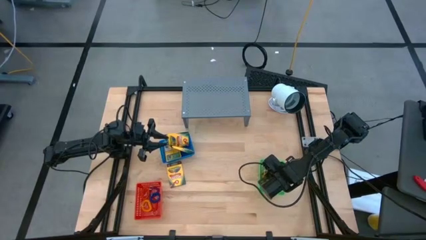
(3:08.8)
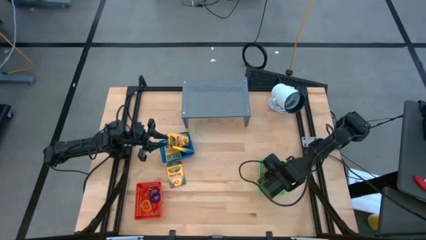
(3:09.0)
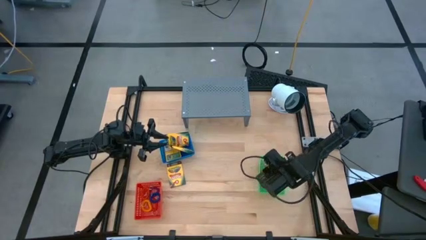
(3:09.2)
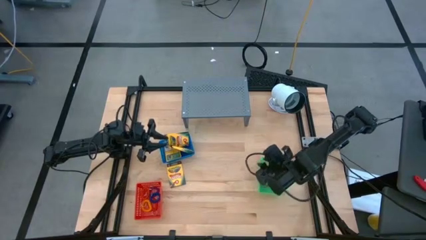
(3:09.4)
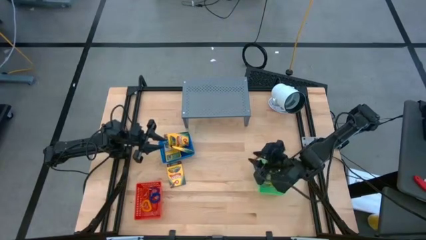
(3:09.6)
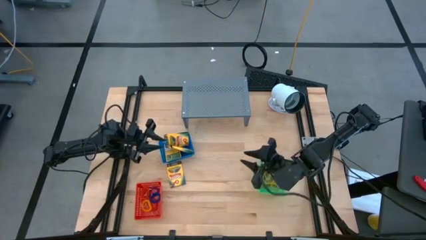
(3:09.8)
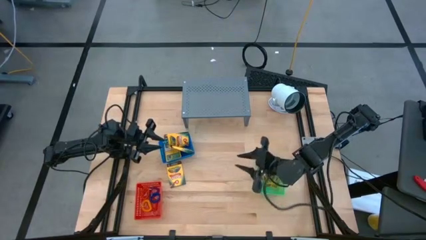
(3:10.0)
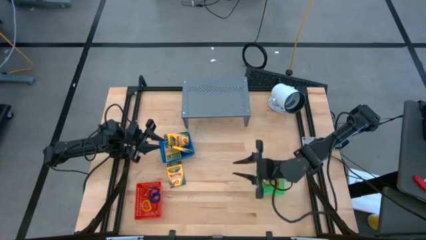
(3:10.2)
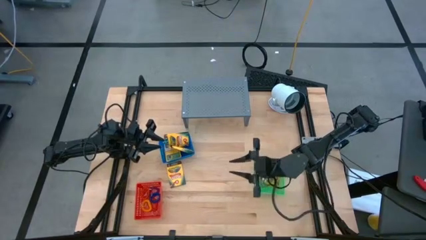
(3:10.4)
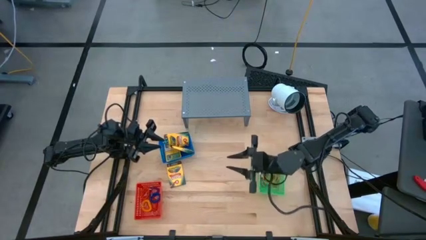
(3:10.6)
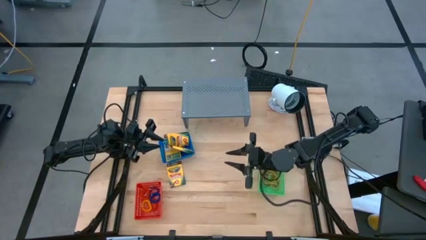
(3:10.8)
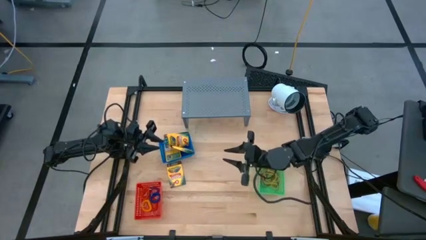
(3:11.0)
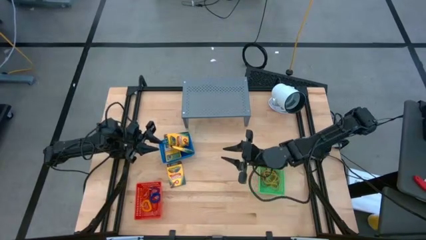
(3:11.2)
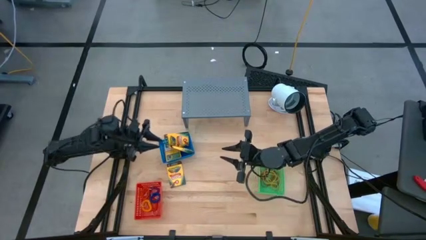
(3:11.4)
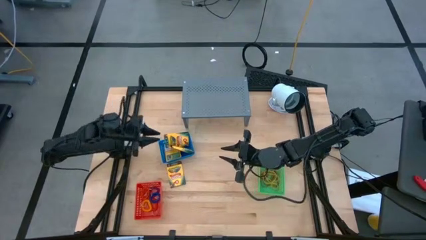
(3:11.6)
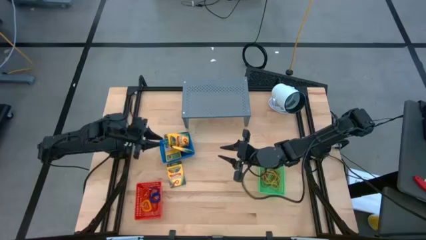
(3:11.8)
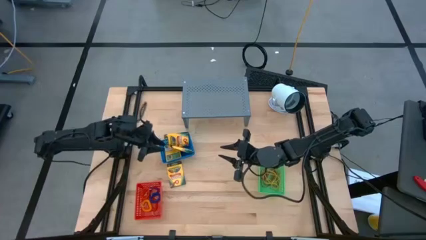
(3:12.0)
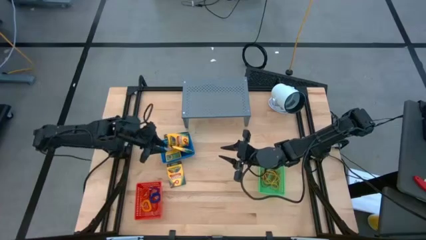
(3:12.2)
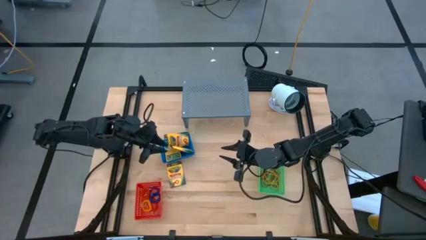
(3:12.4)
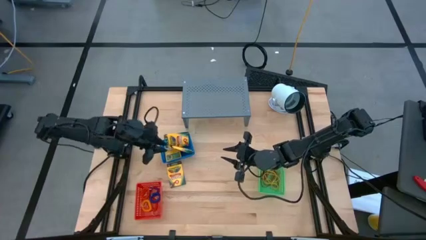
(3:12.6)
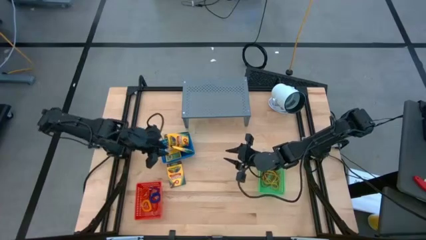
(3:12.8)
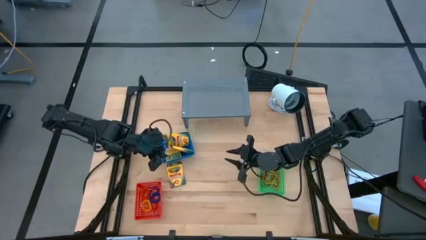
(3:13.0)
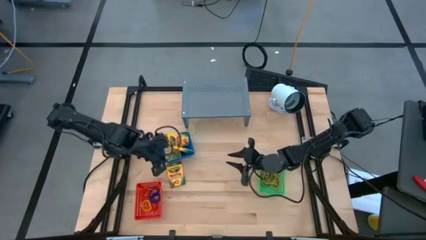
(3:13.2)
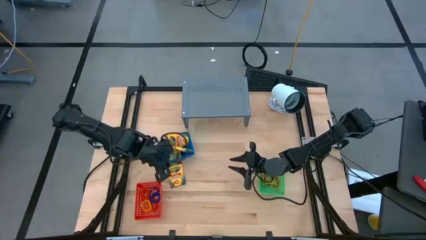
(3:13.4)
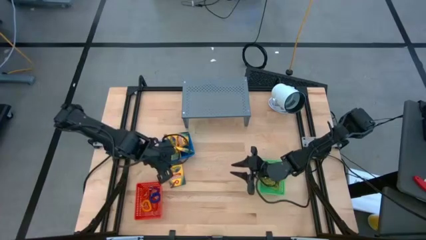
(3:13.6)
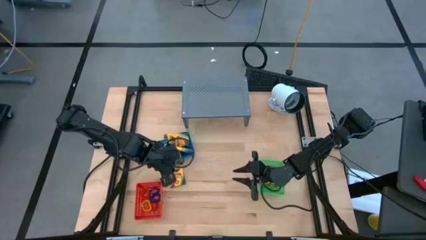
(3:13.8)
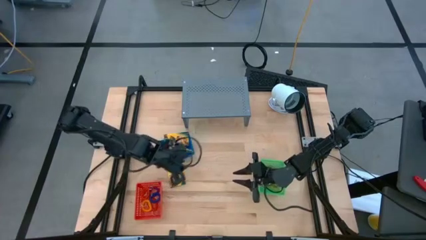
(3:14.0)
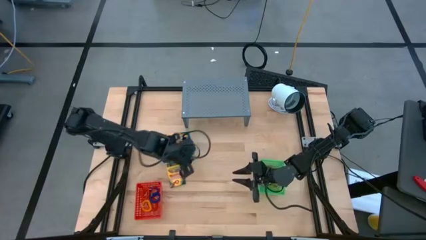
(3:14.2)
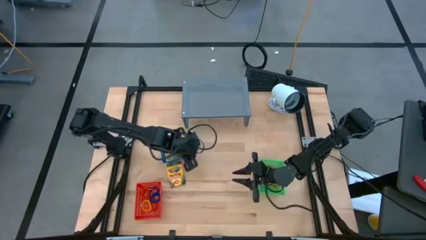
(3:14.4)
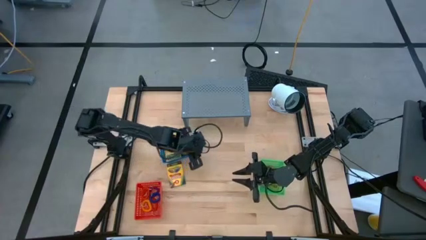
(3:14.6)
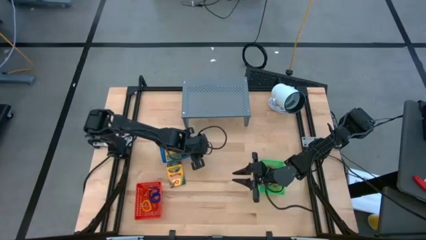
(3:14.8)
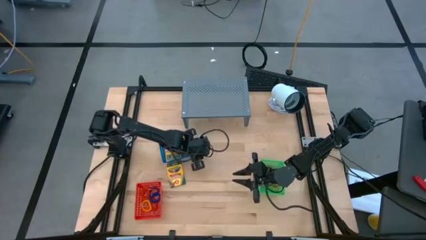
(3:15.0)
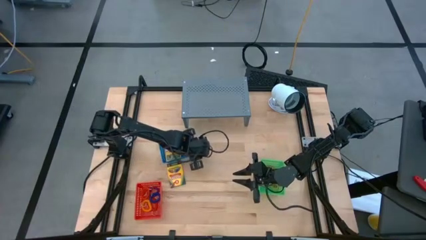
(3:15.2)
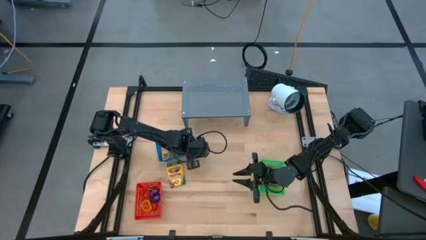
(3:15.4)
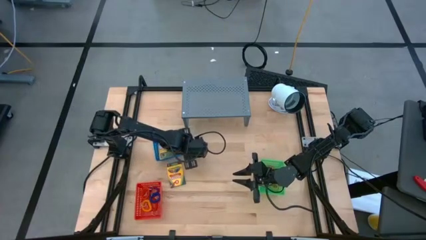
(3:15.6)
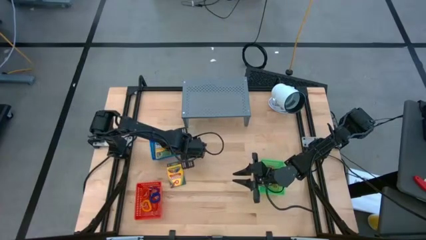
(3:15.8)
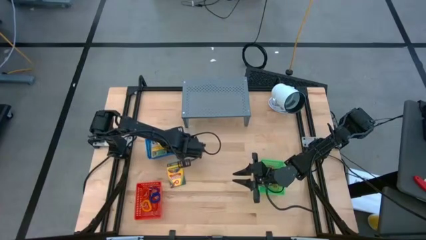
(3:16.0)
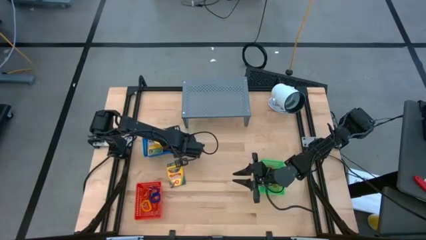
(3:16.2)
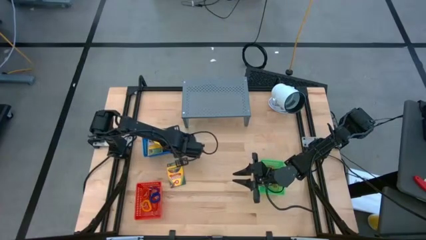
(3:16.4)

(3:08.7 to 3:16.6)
Task: Pick & Place Office Desk Supplies
Adjust the blue bin

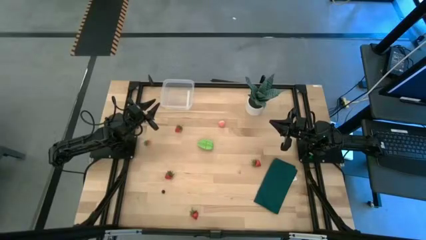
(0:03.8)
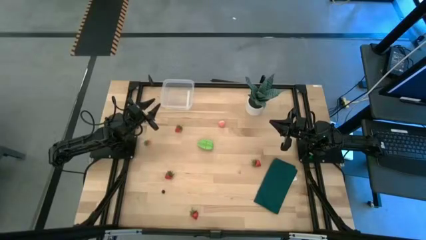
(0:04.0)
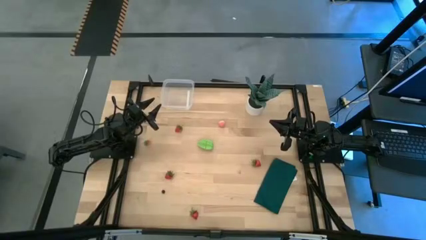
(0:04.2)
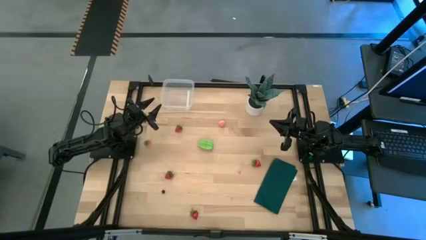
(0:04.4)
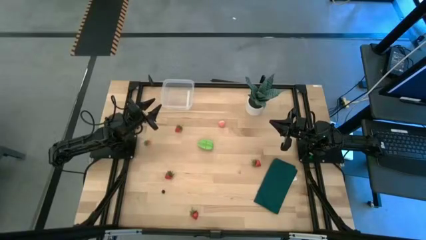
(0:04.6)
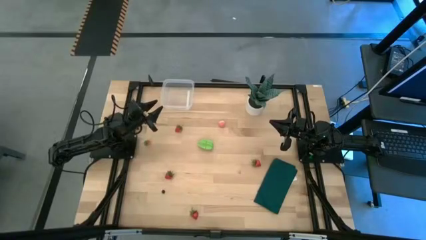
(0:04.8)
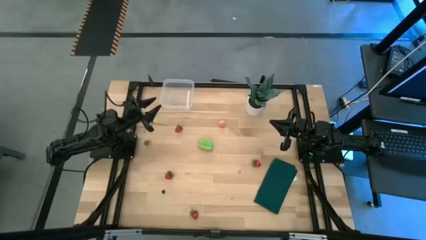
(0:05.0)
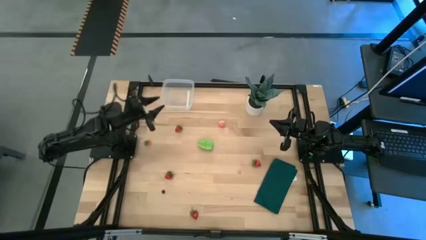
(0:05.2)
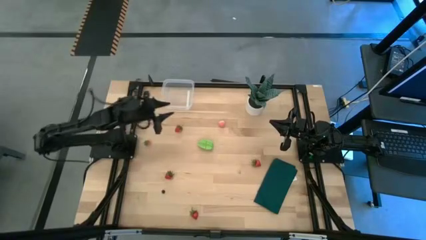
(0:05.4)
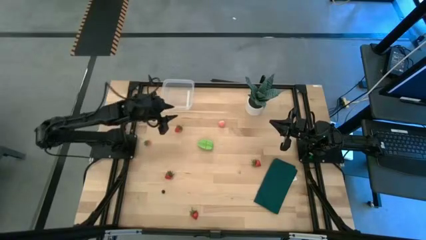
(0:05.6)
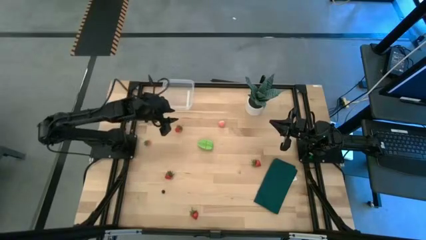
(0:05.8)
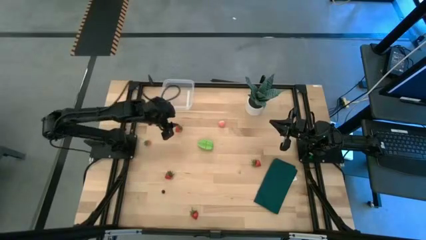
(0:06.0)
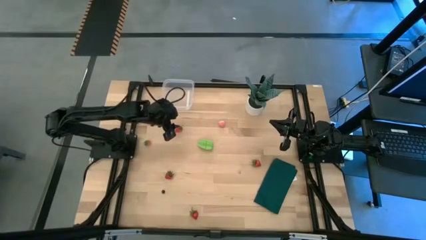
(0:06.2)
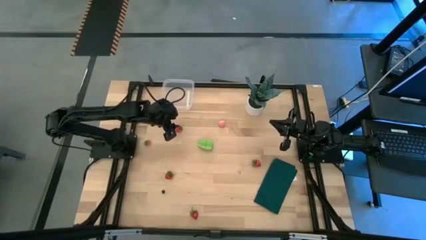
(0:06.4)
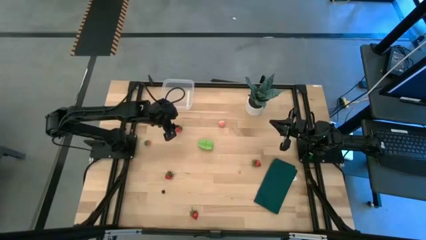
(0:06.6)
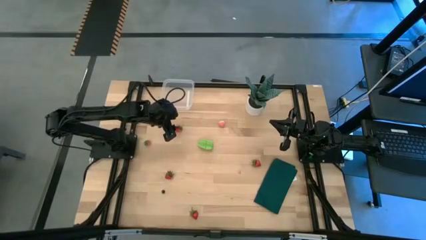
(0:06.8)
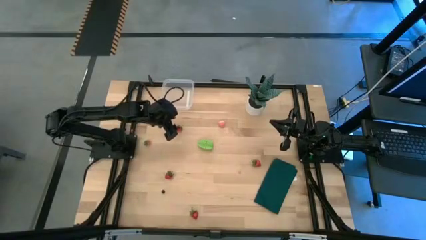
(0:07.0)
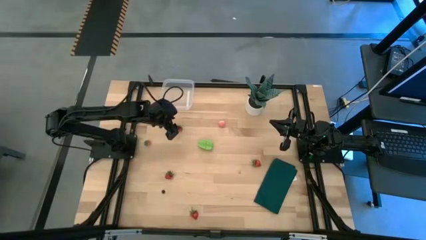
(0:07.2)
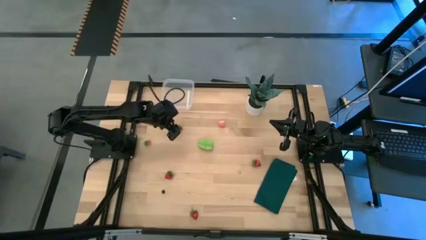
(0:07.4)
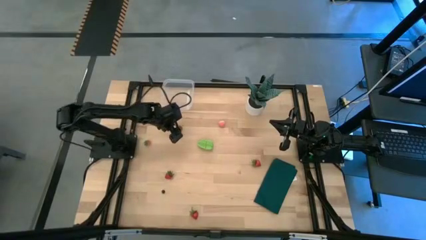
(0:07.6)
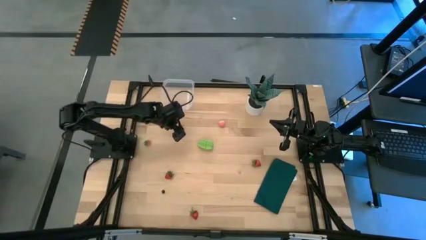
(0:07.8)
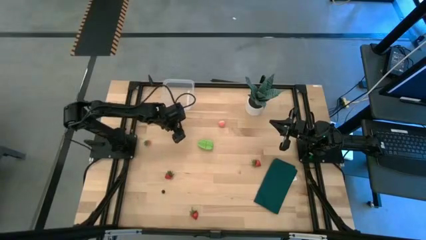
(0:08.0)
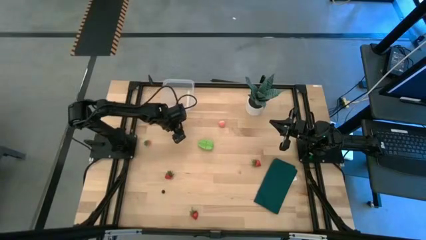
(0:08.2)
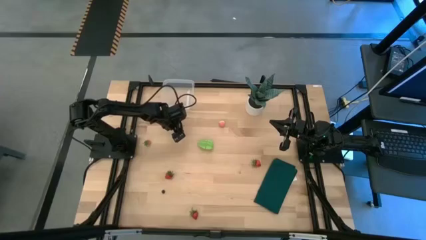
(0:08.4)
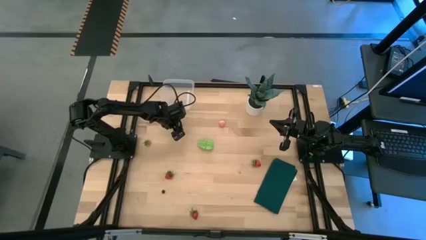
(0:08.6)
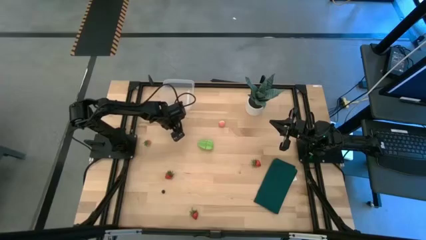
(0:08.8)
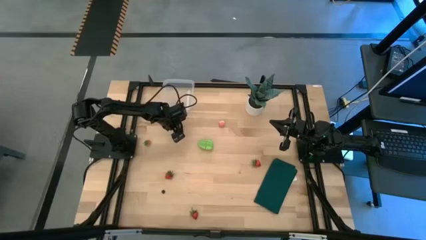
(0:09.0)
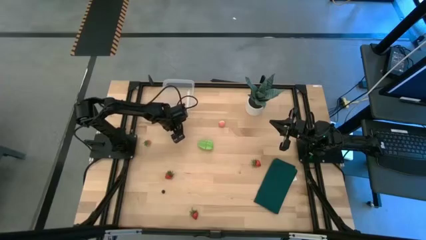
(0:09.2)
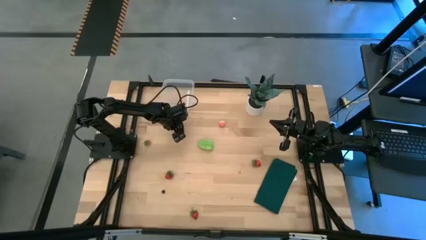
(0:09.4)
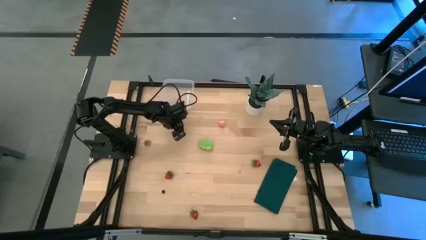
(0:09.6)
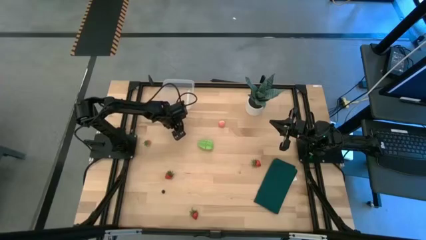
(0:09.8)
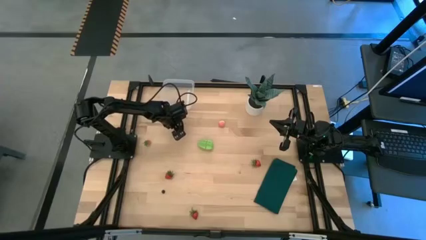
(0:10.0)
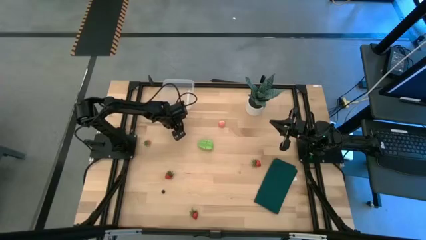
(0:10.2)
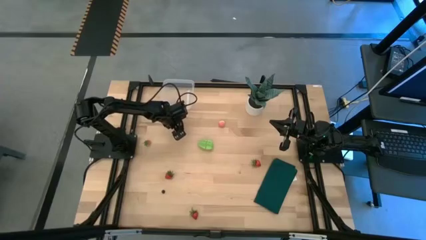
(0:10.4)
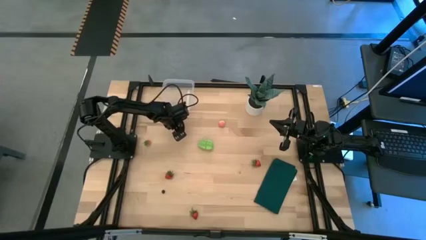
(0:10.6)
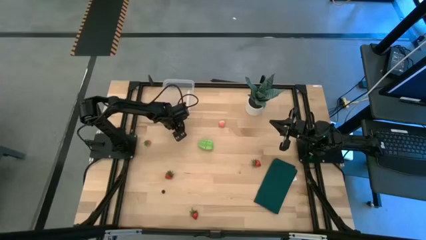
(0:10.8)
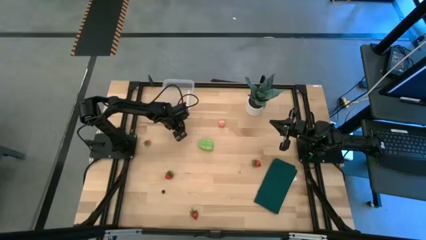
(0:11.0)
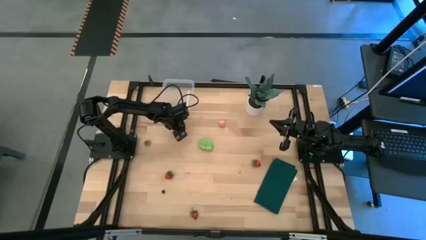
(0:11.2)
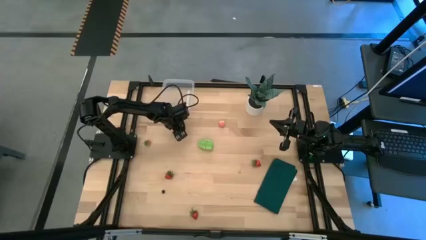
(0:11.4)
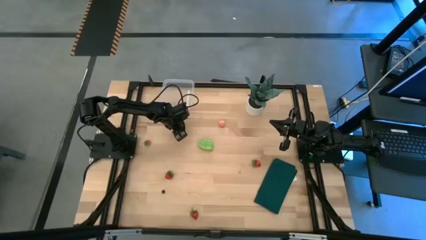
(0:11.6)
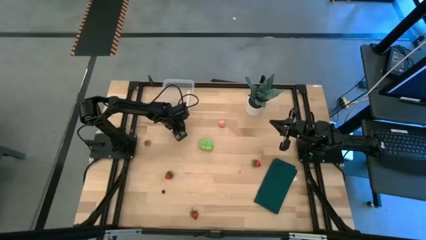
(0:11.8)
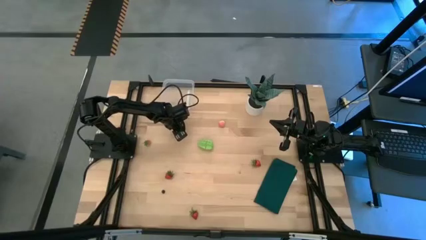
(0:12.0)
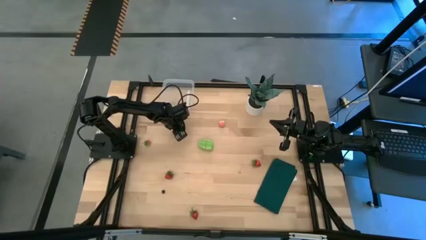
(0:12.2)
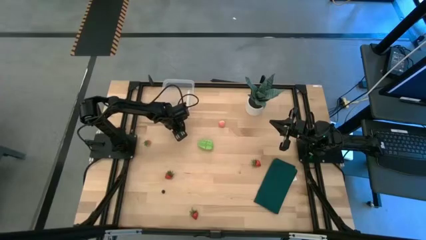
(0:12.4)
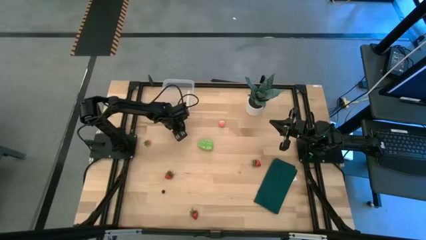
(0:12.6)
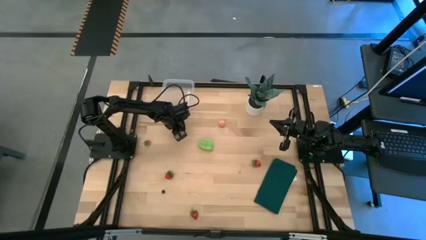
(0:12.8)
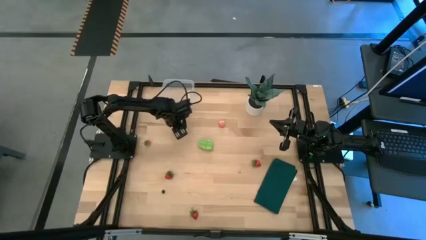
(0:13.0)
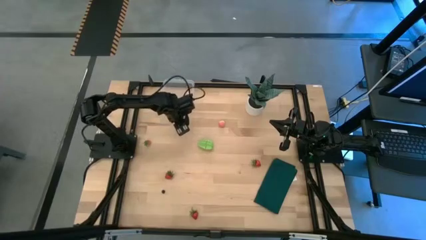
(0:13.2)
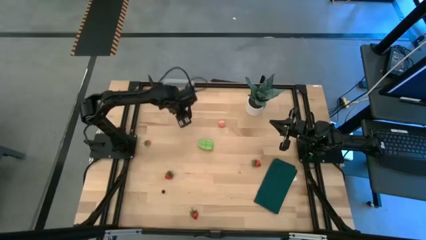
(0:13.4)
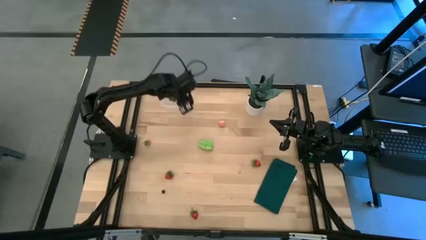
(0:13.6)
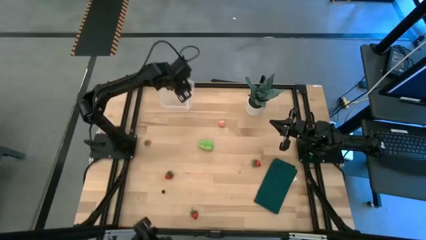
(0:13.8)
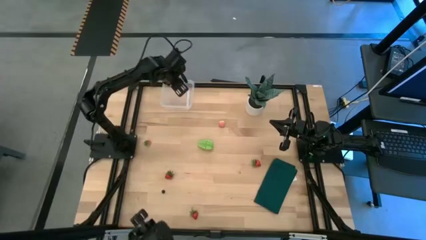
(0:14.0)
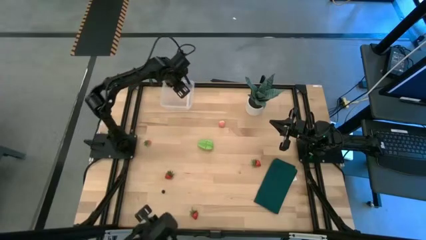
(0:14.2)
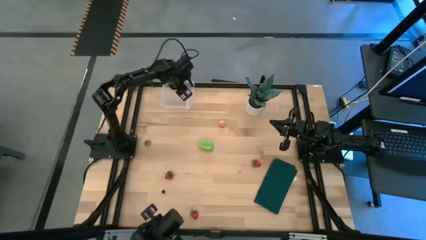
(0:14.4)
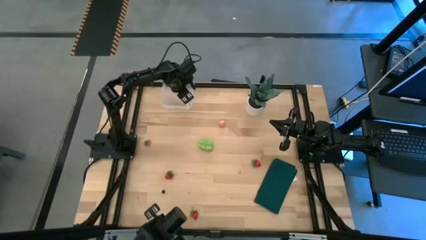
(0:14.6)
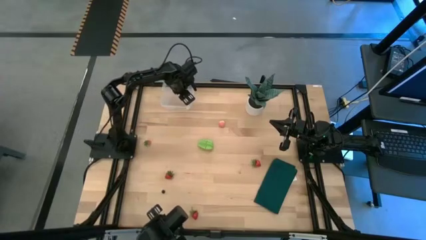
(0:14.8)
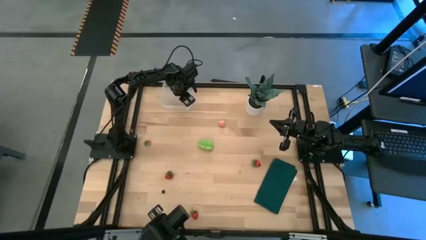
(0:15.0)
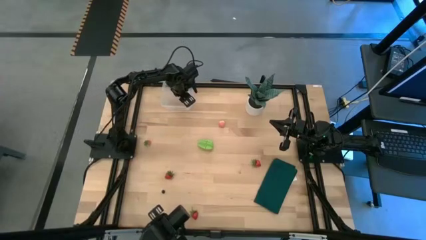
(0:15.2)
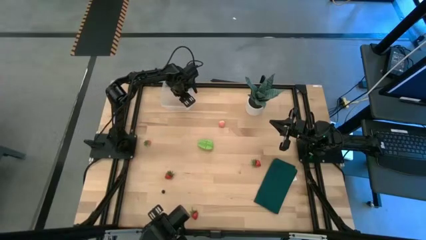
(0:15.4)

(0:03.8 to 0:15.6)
Task: Pick and placing Produce into tupperware
Put the red strawberry into the transparent container
